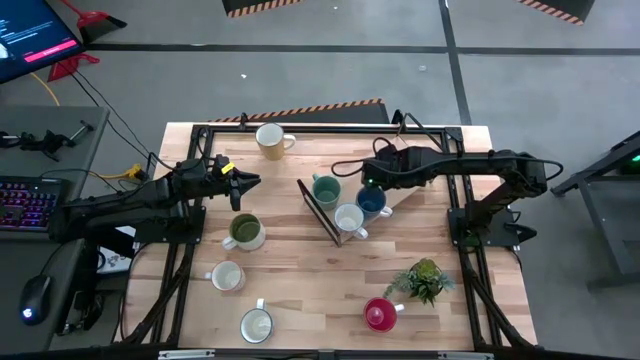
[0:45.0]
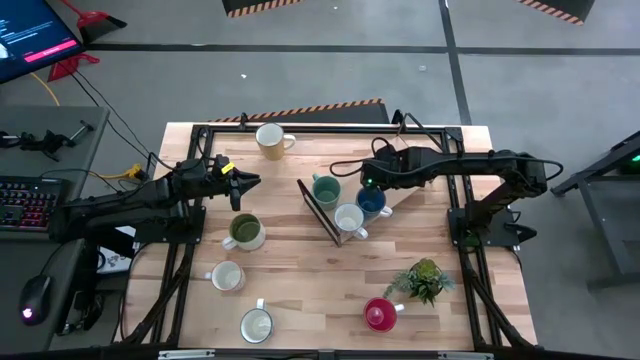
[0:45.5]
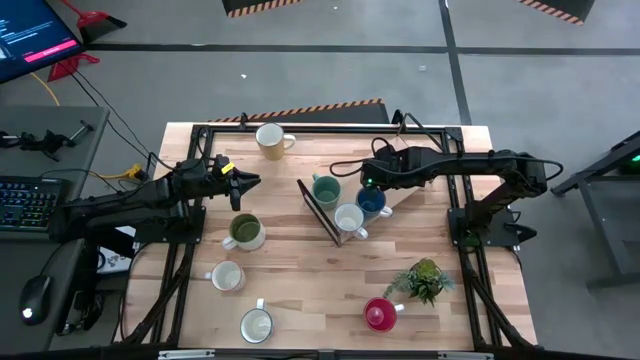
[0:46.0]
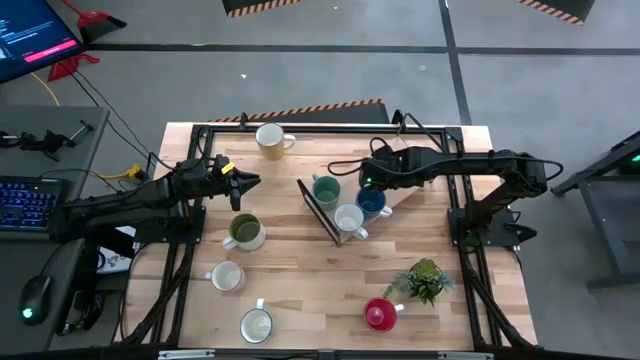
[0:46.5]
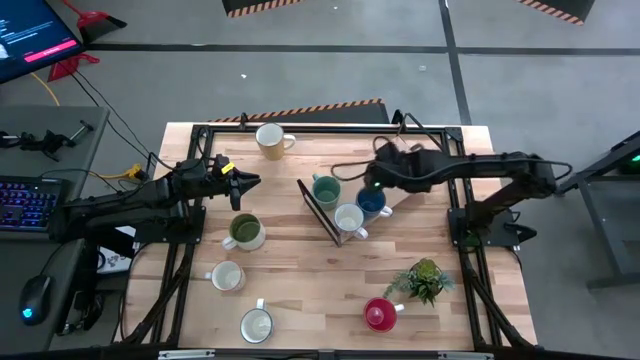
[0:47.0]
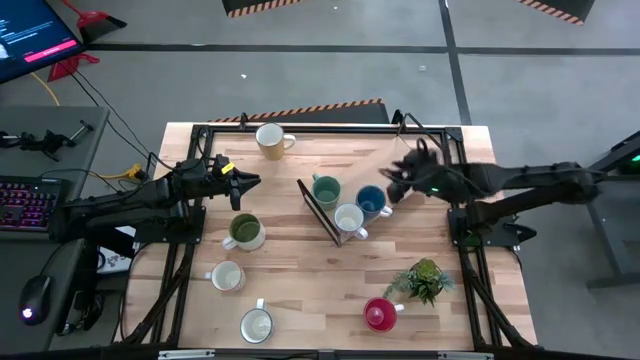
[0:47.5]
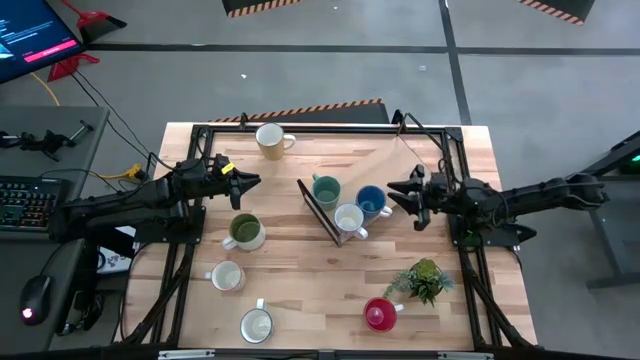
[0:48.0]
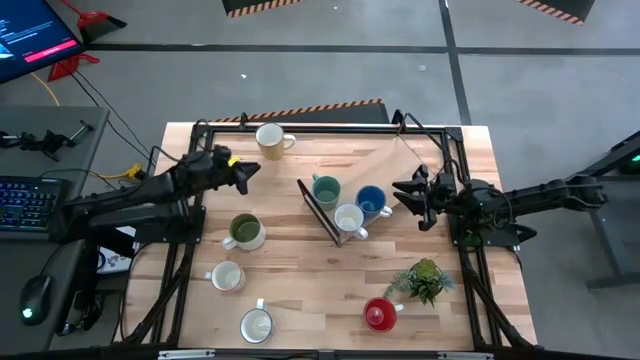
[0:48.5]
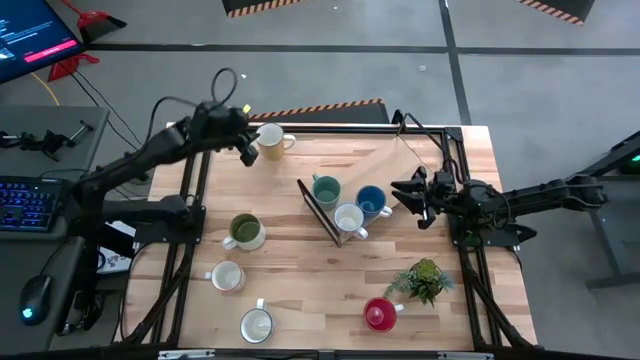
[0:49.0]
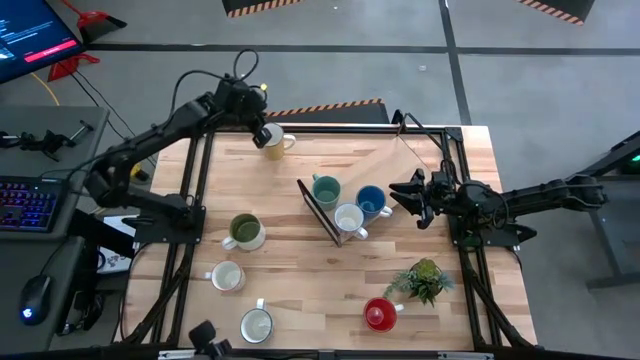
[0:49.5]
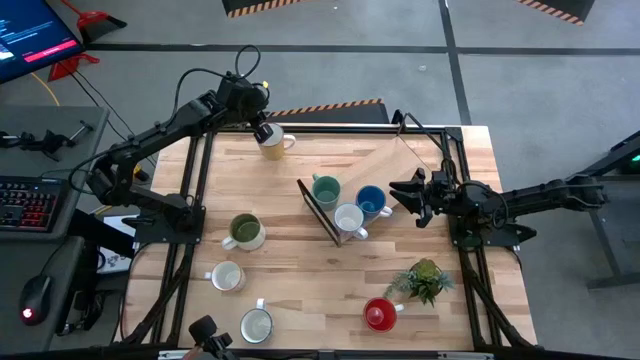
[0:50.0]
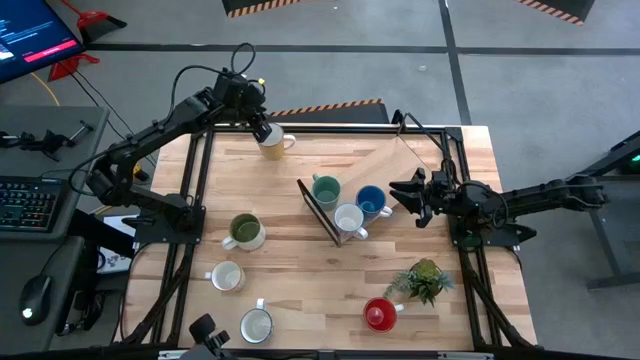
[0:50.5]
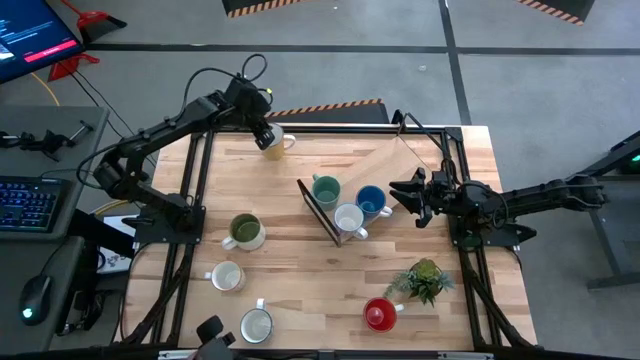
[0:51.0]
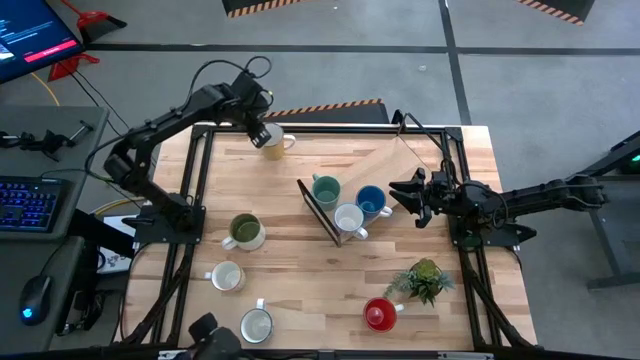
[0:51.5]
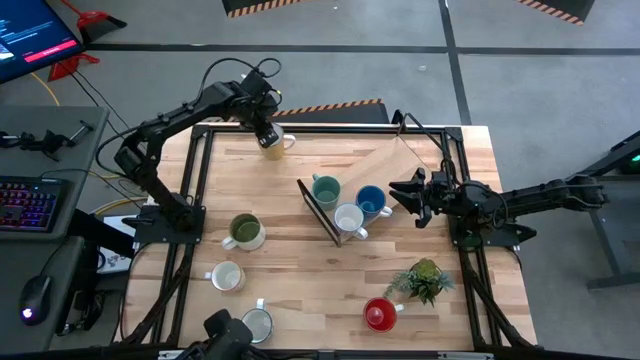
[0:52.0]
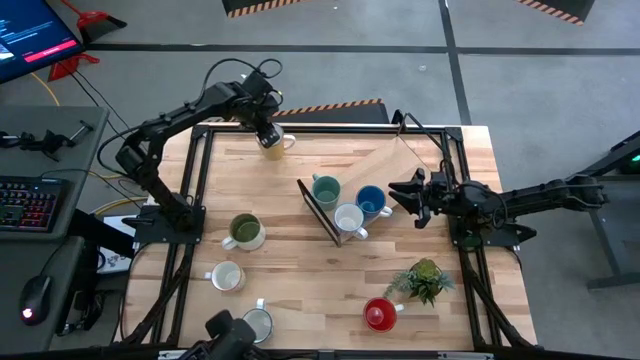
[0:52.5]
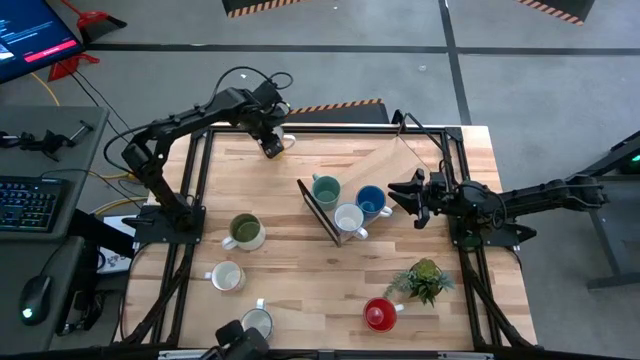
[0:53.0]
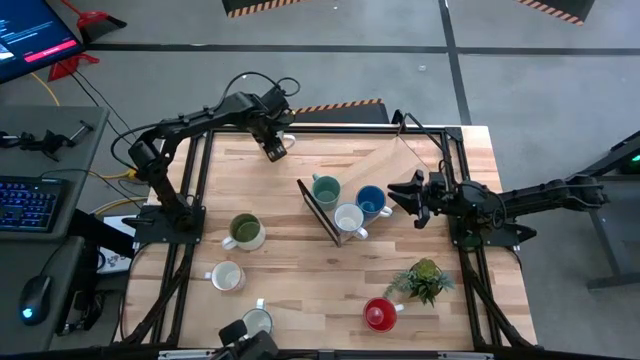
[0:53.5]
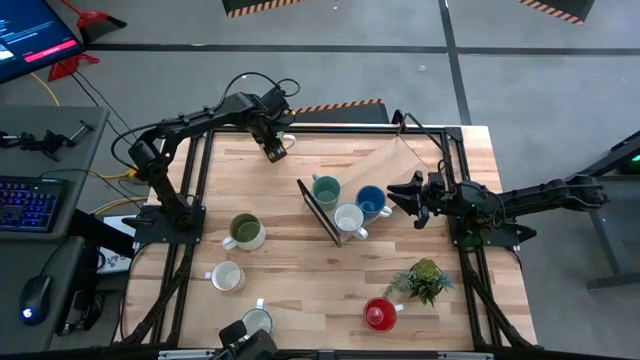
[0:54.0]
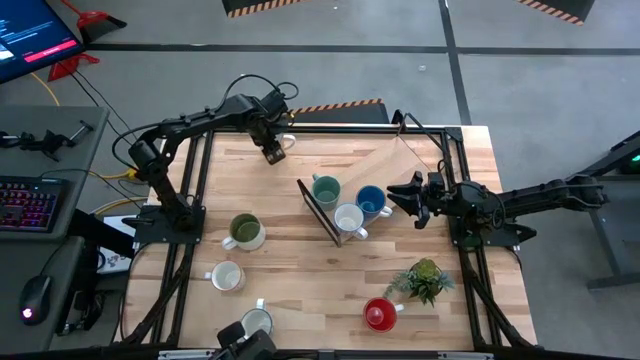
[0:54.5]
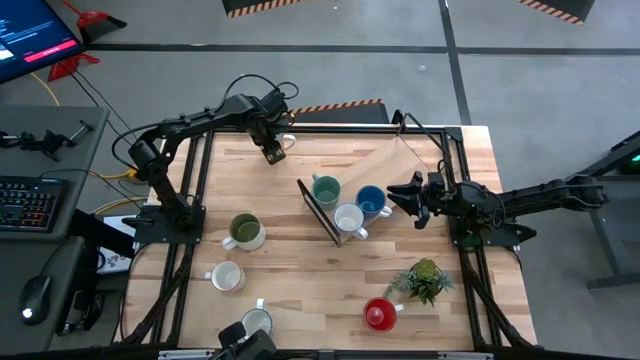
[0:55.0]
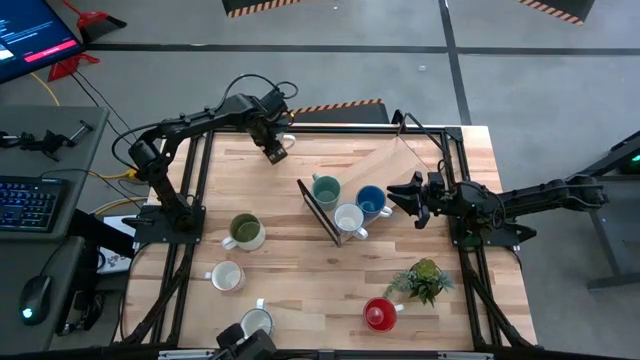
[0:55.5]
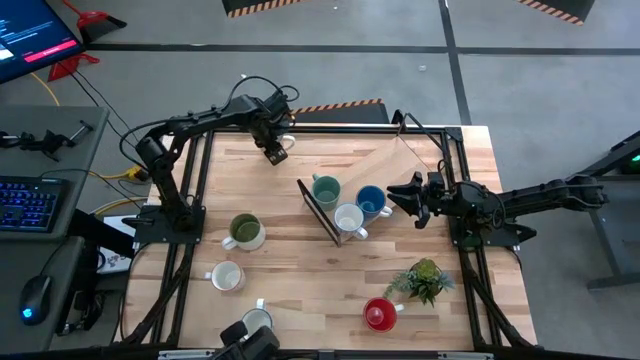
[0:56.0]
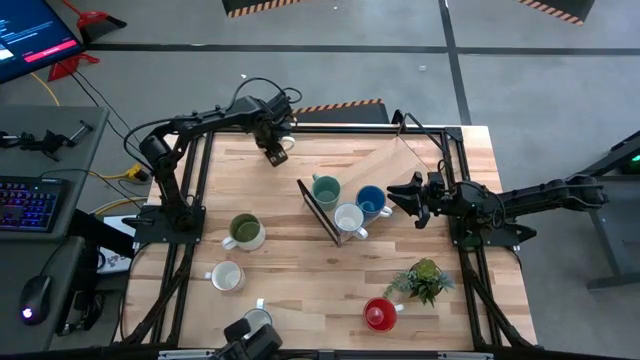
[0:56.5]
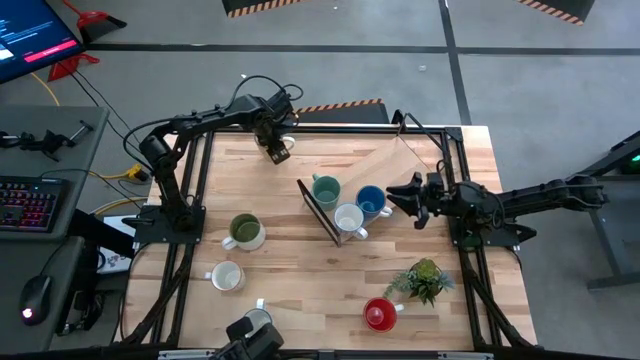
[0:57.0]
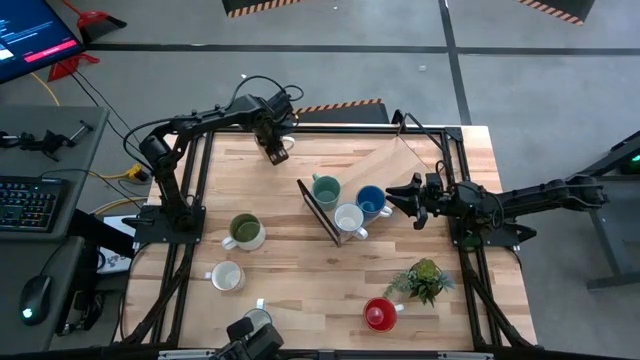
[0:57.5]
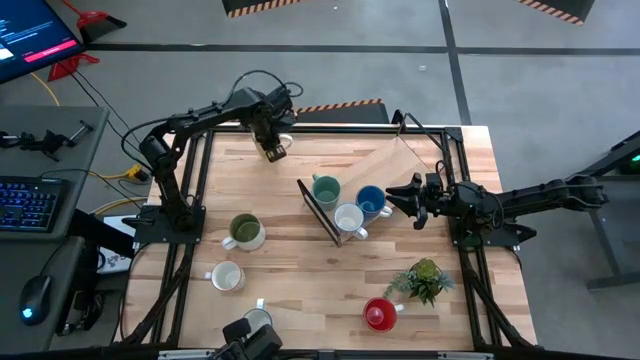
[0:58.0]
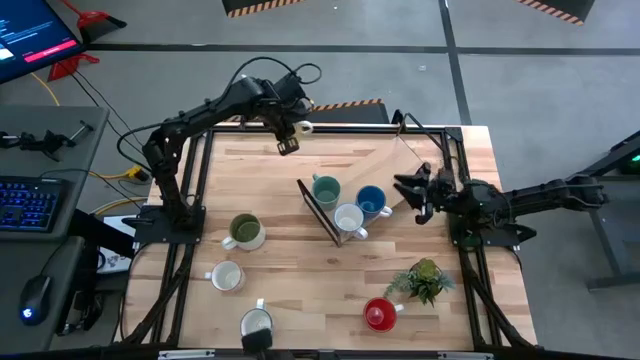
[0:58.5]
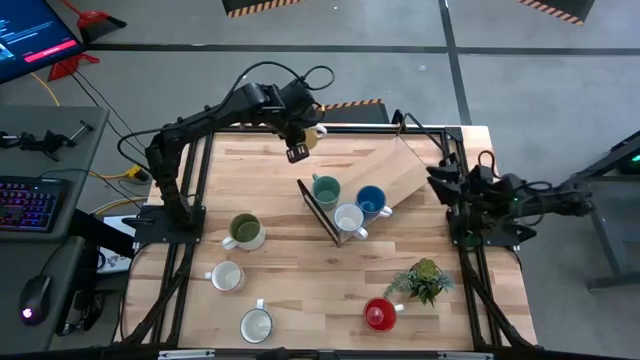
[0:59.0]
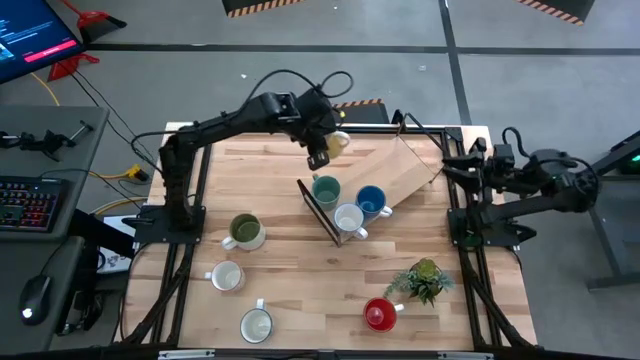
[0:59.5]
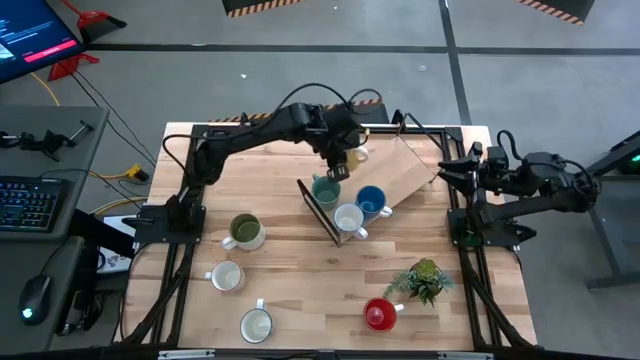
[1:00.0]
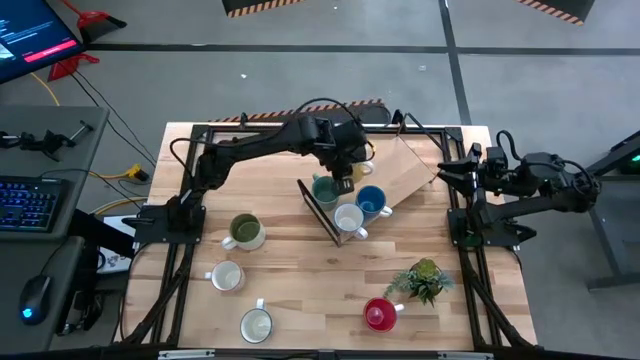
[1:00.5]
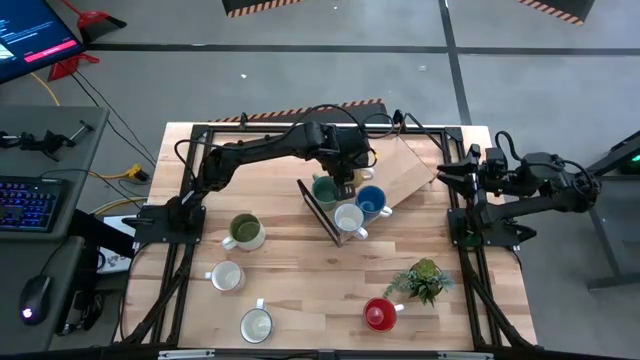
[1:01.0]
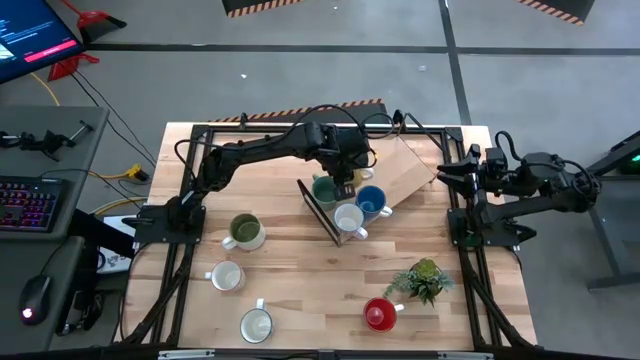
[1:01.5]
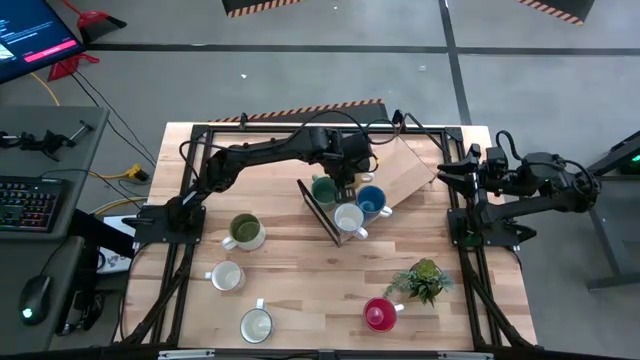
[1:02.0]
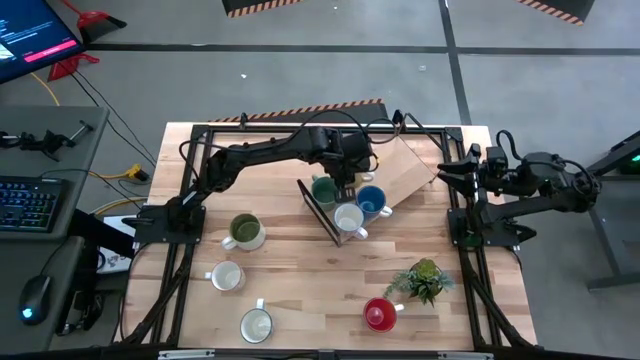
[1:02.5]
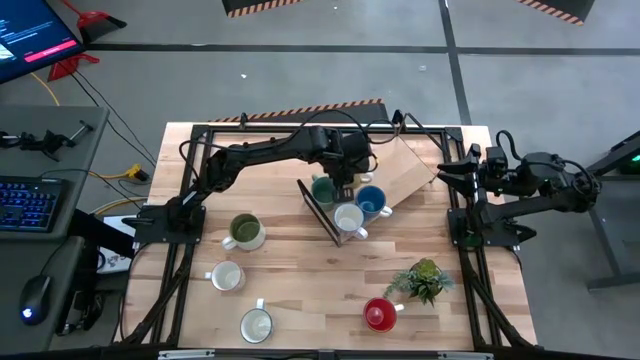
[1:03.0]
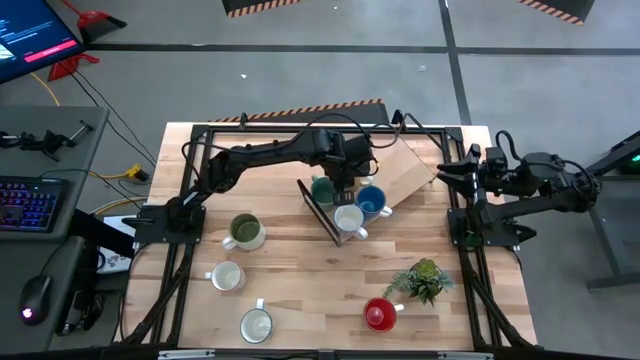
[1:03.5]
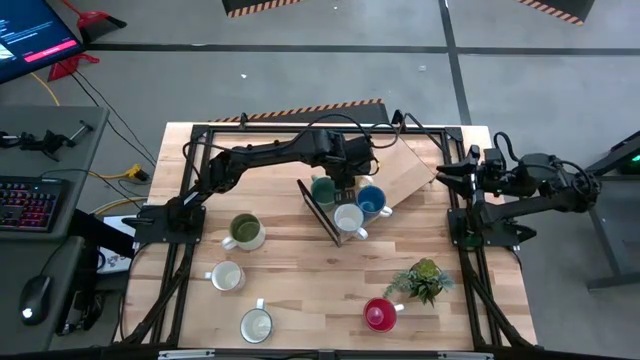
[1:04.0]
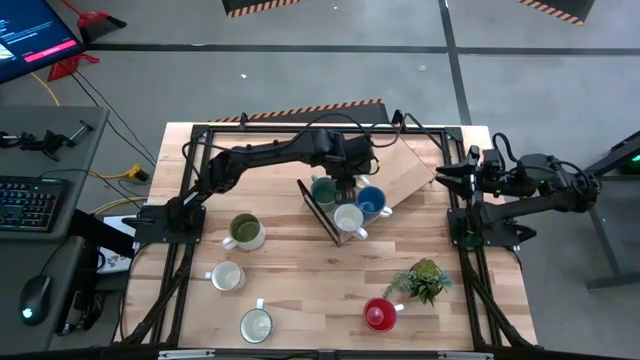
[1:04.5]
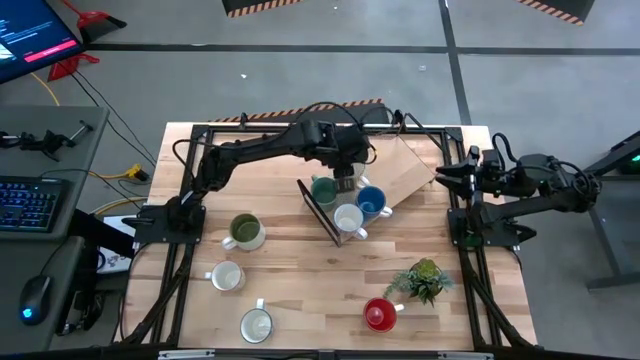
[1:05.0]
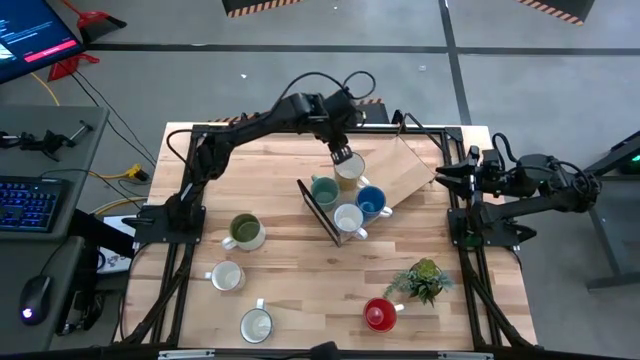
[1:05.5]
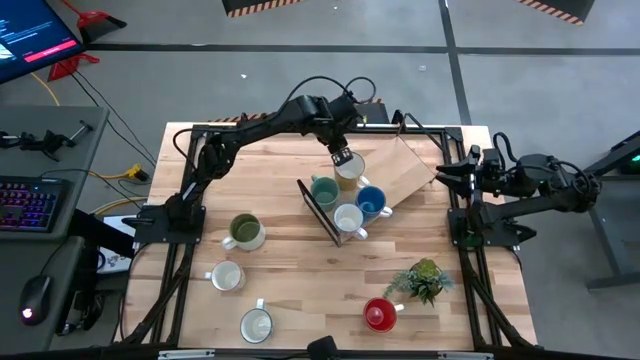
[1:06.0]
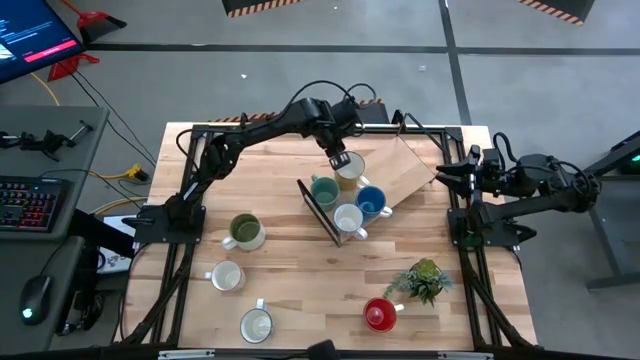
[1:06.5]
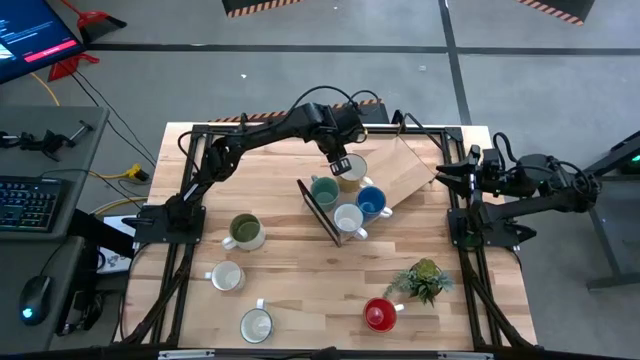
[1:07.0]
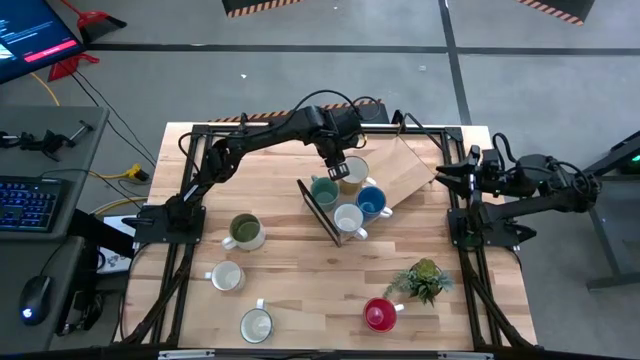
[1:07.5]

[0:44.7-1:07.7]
Task: Place coffee mugs
Put the yellow mug on the shelf
